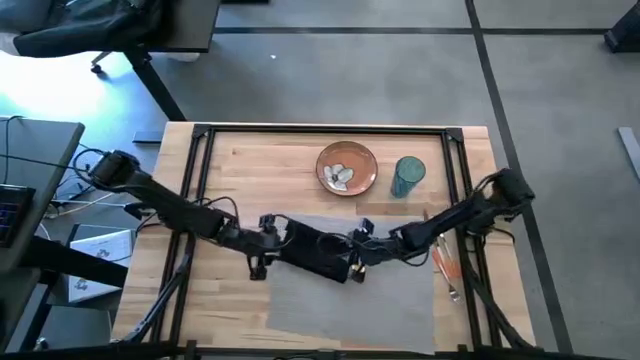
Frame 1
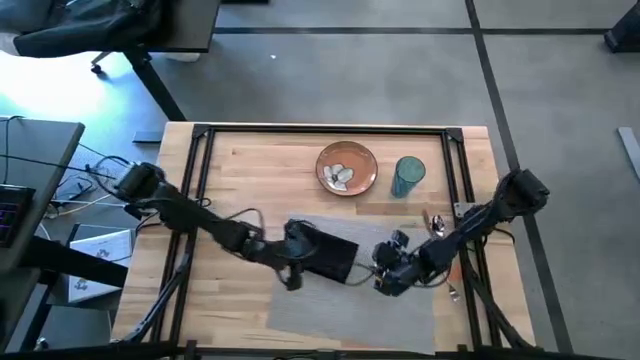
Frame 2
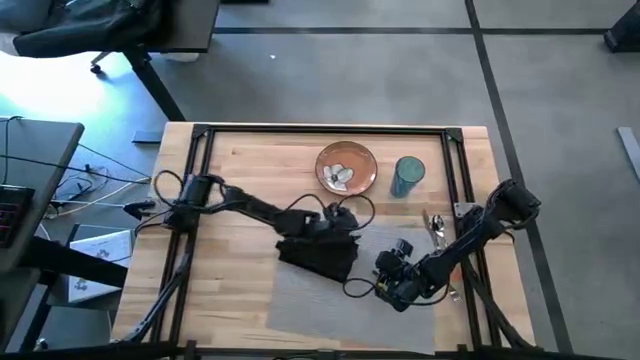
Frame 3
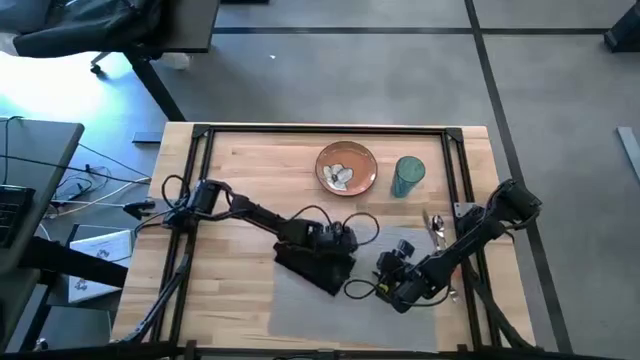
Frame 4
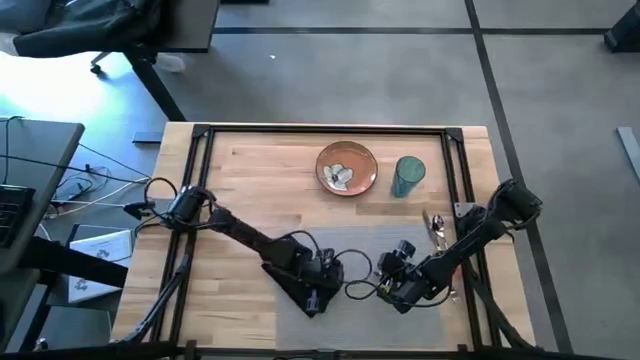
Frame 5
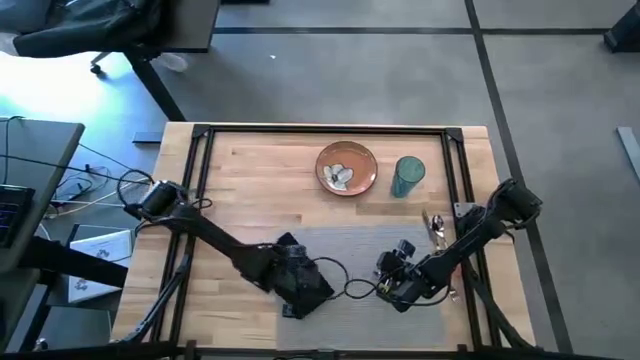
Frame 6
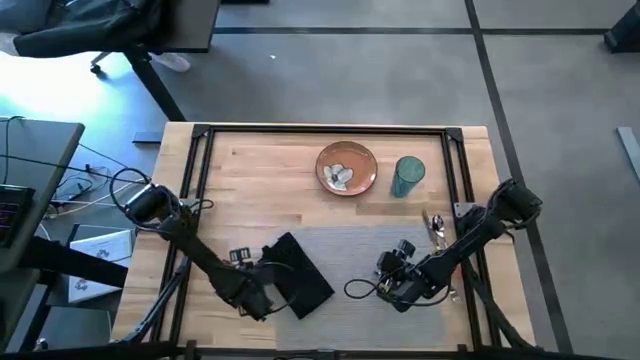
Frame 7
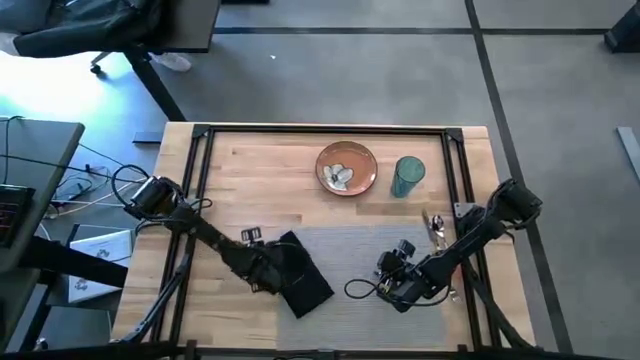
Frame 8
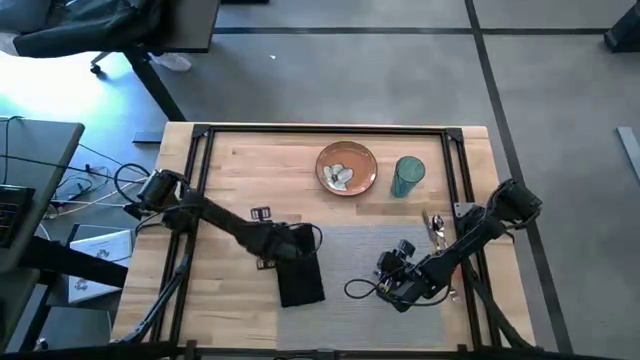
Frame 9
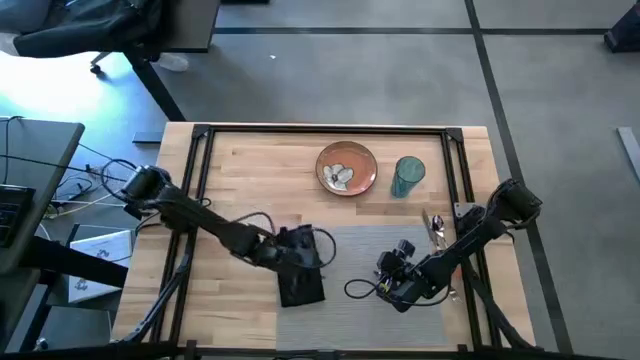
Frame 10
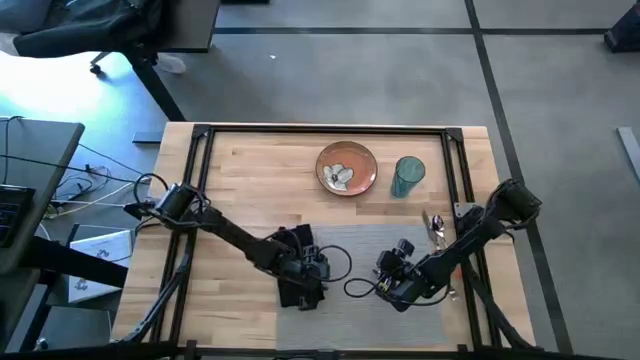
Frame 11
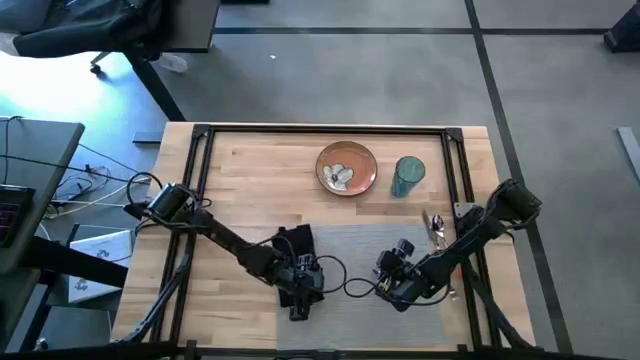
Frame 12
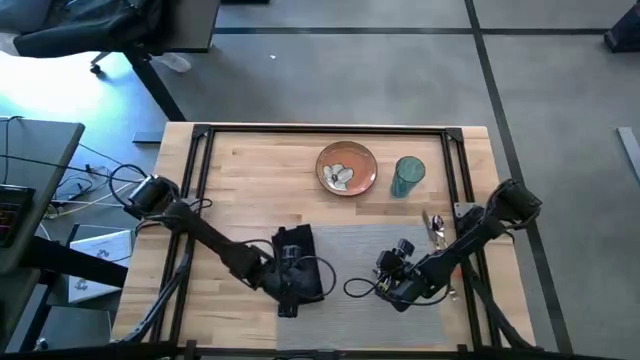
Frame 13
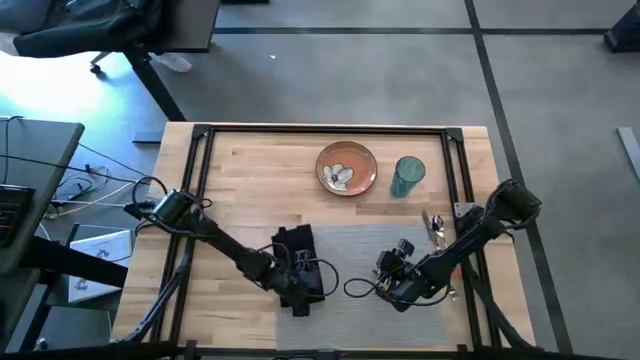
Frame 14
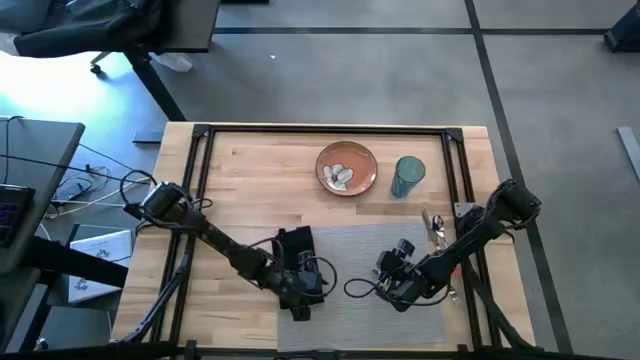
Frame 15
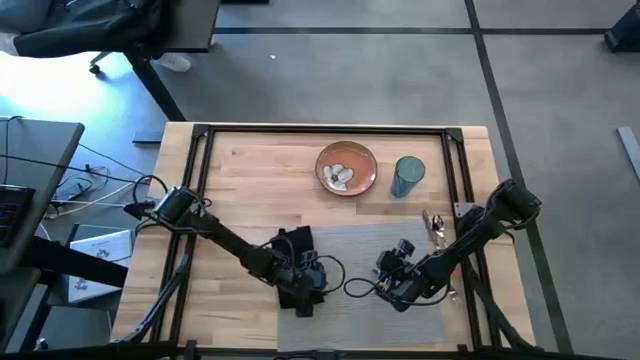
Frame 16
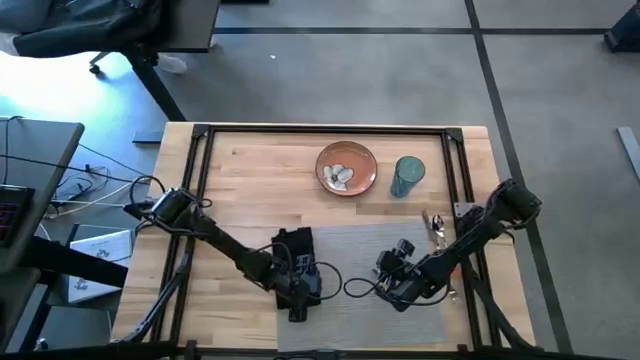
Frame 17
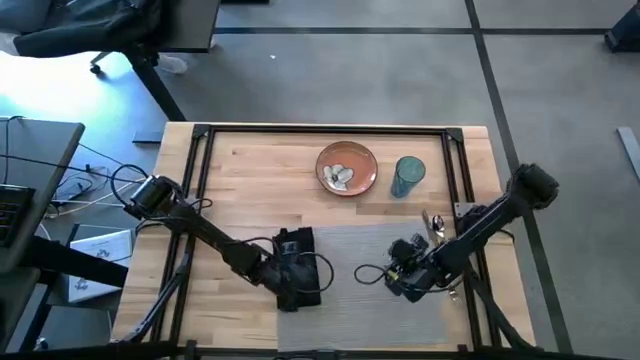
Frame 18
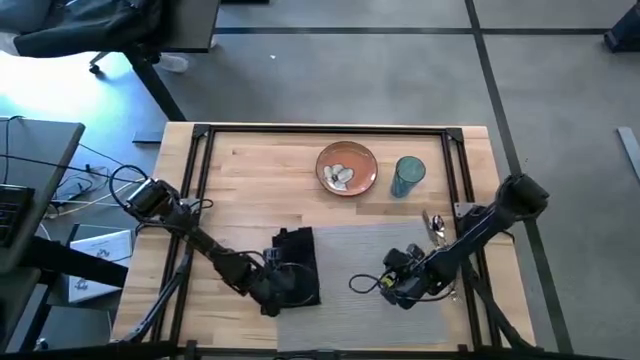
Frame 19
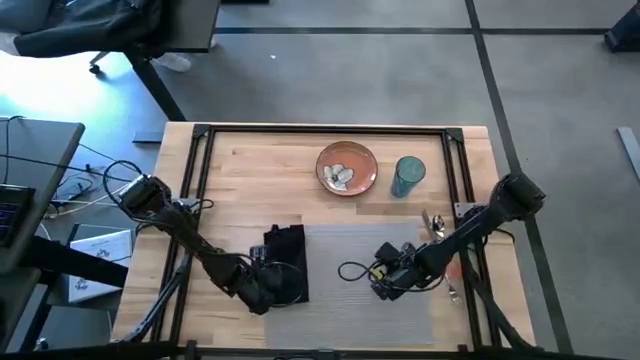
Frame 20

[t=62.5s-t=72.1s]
Task: Set table place
Adjust the black table napkin to the left of the gray tablemat

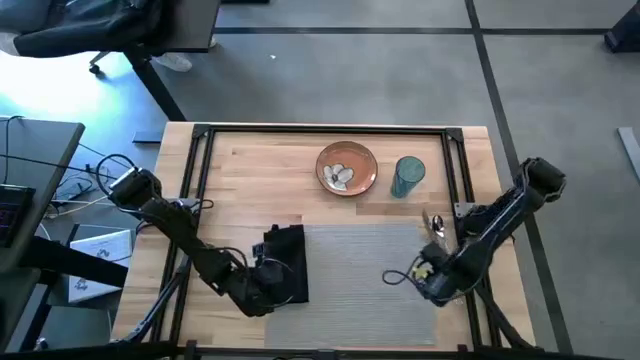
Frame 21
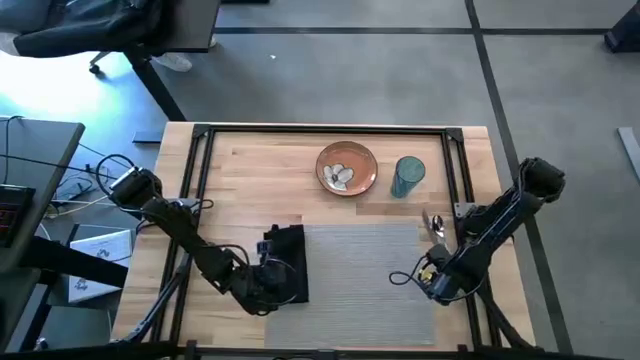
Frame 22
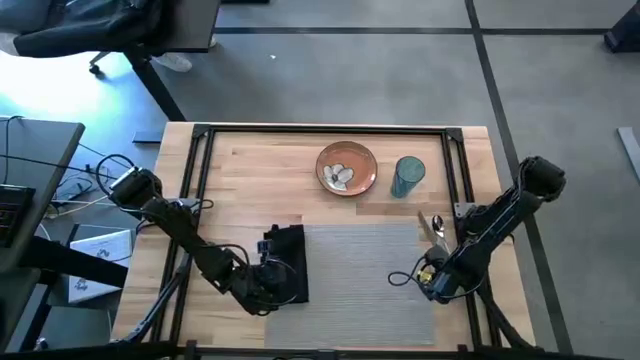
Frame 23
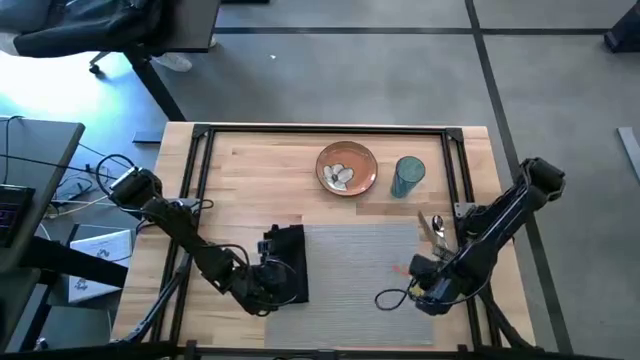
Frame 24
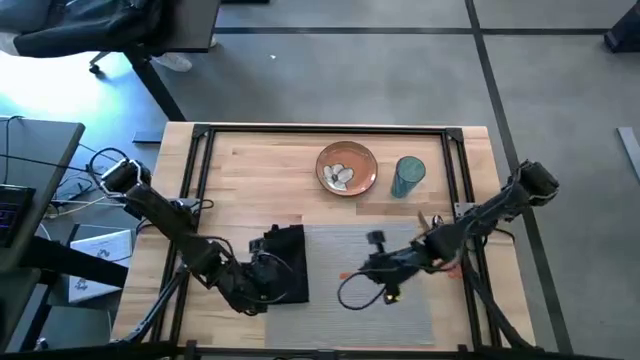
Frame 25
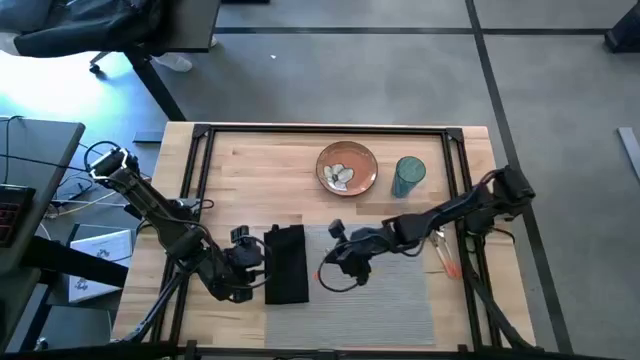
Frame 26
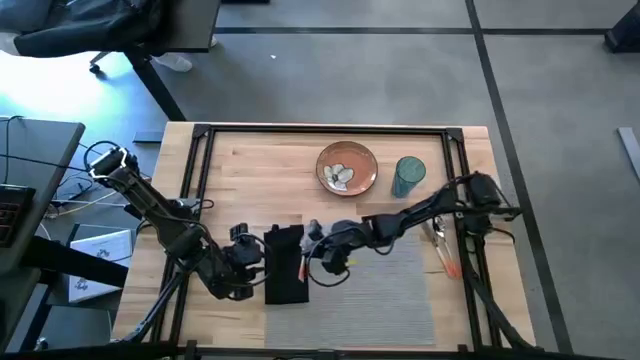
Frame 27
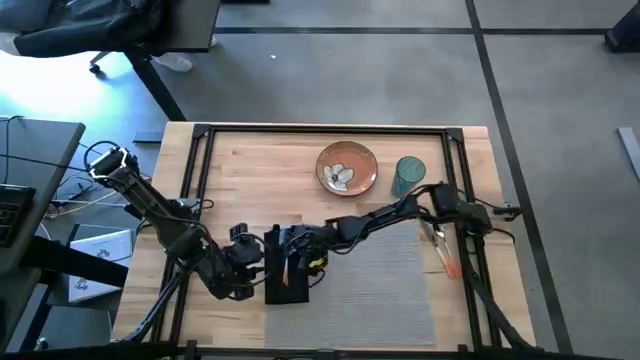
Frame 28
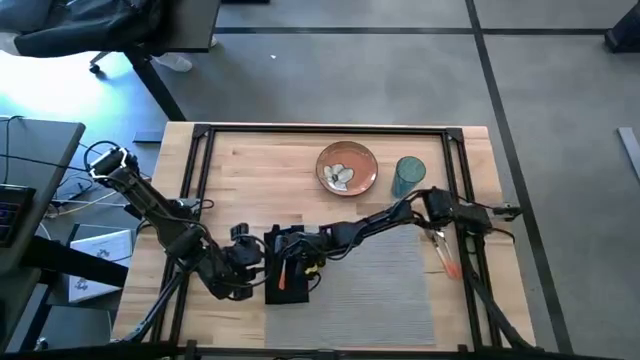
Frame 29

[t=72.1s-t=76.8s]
Put the orange fork on the black table napkin on the gray tablemat
